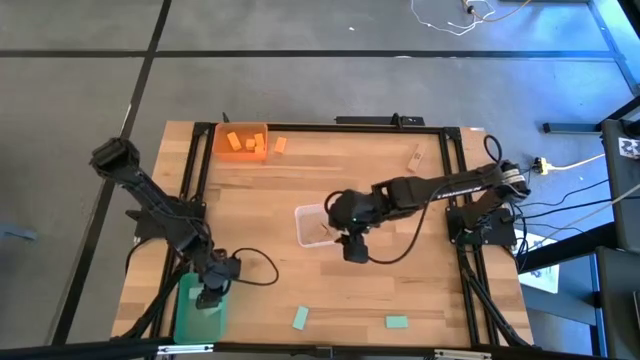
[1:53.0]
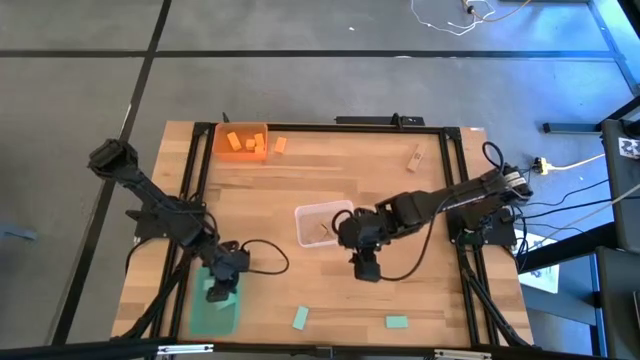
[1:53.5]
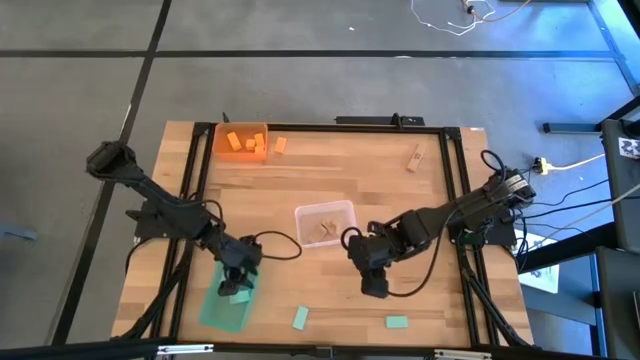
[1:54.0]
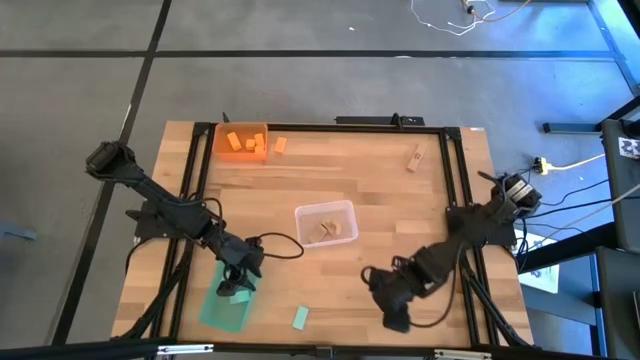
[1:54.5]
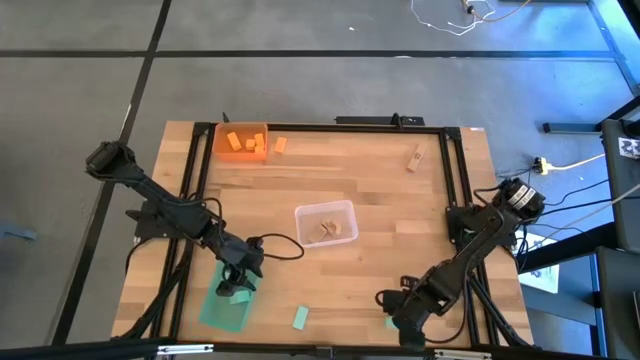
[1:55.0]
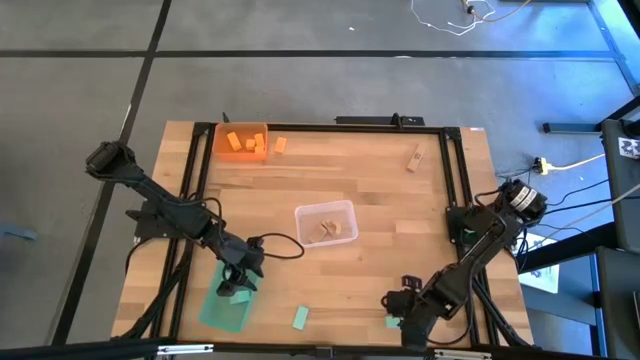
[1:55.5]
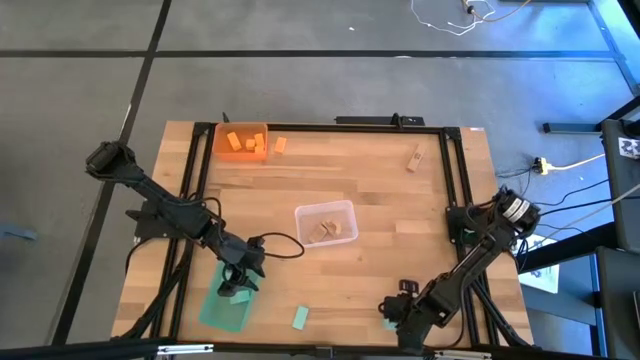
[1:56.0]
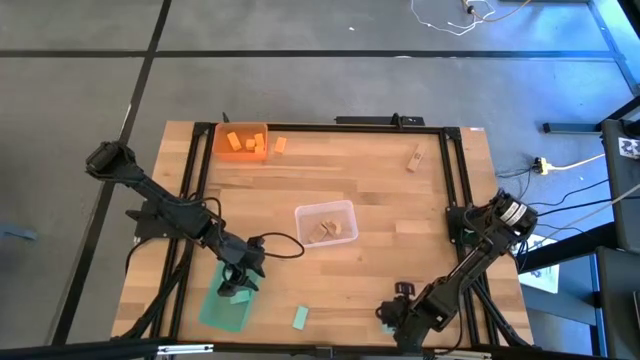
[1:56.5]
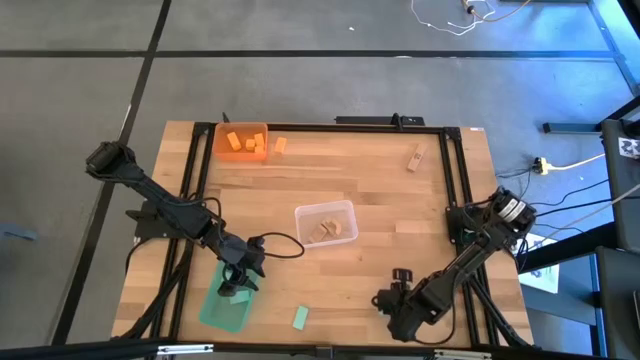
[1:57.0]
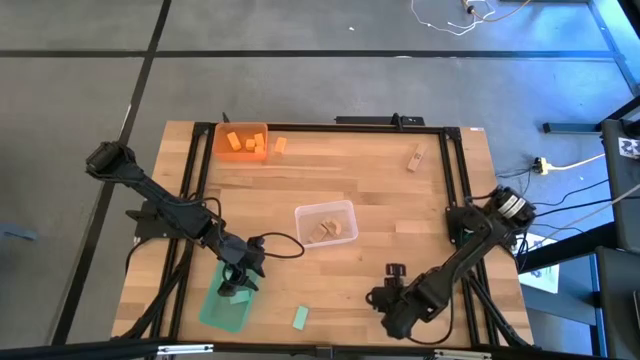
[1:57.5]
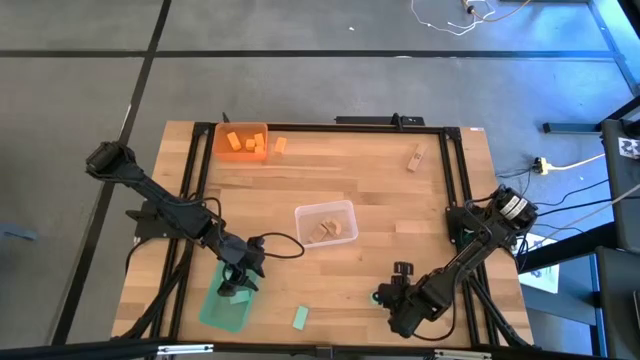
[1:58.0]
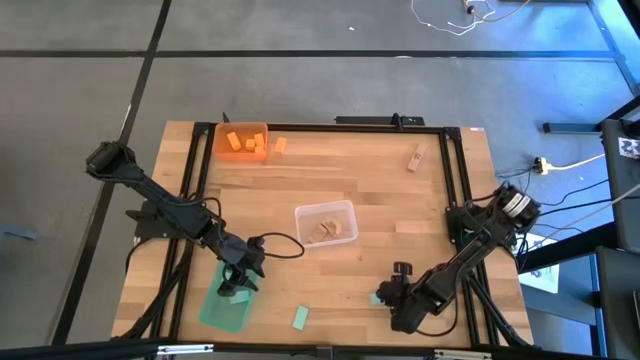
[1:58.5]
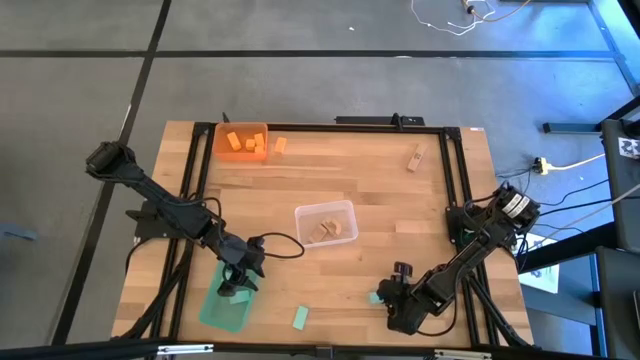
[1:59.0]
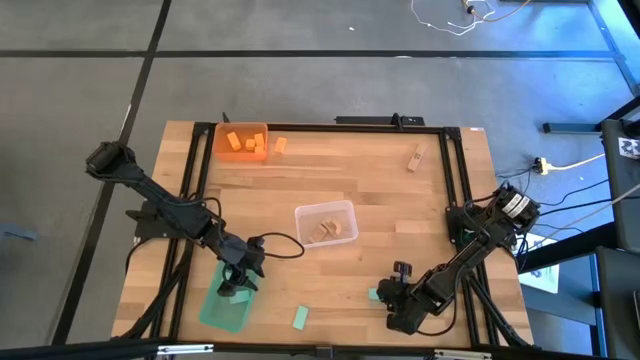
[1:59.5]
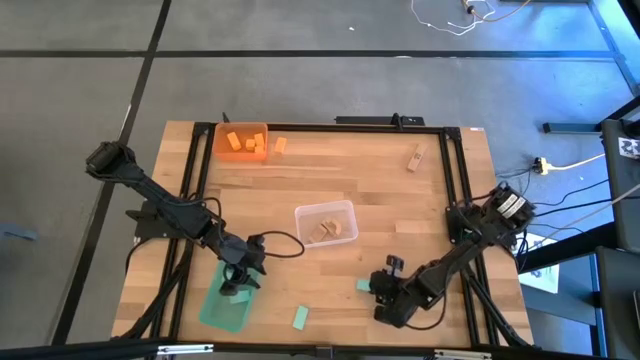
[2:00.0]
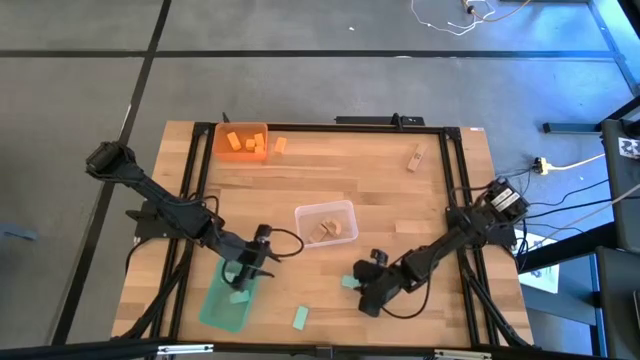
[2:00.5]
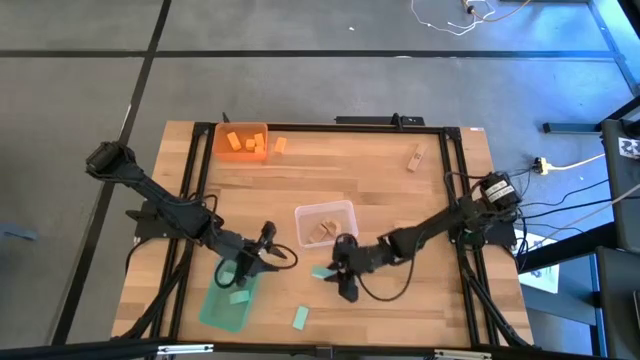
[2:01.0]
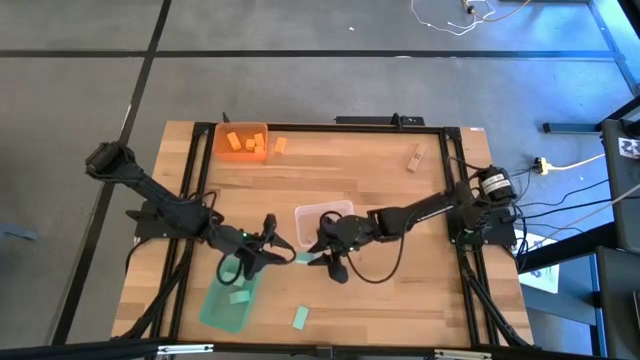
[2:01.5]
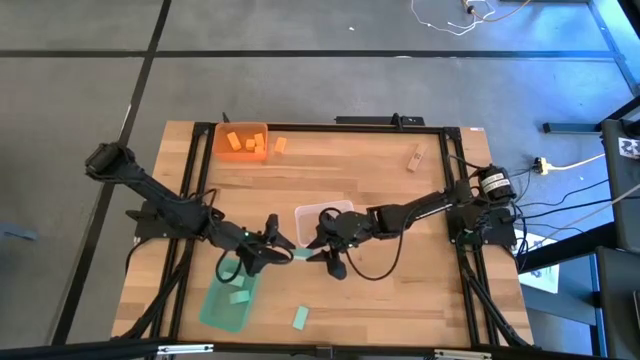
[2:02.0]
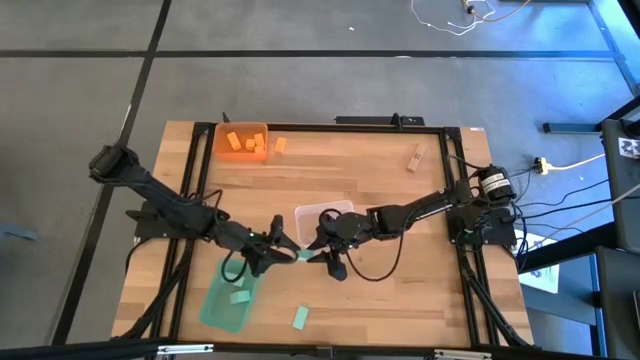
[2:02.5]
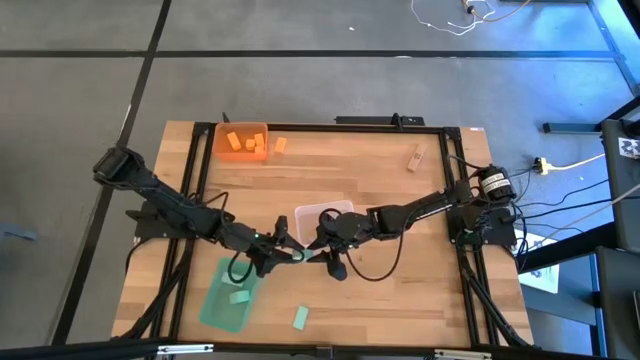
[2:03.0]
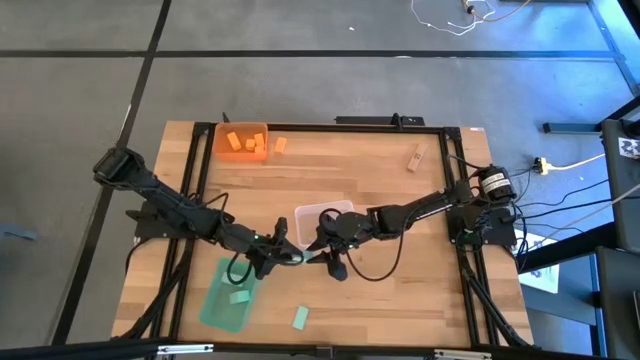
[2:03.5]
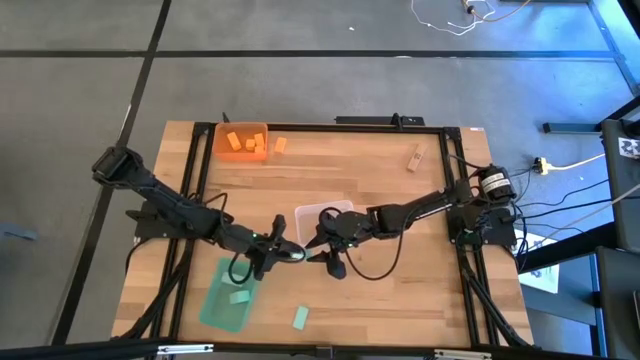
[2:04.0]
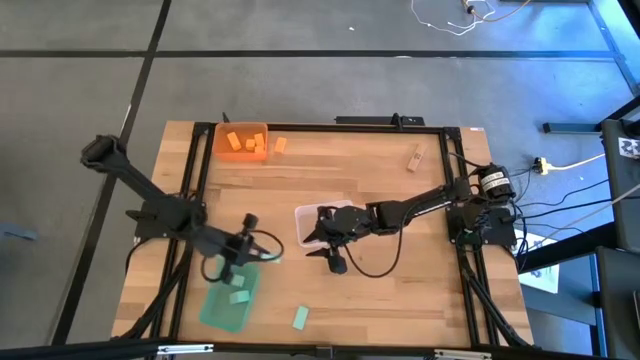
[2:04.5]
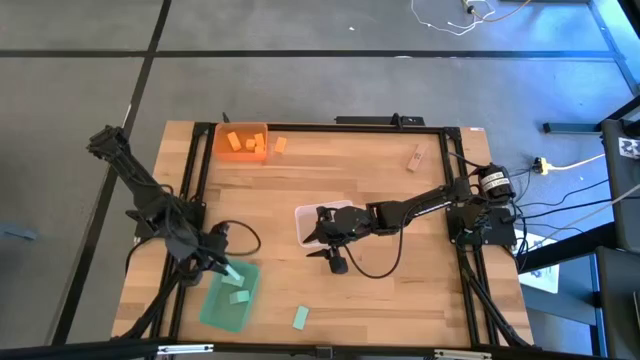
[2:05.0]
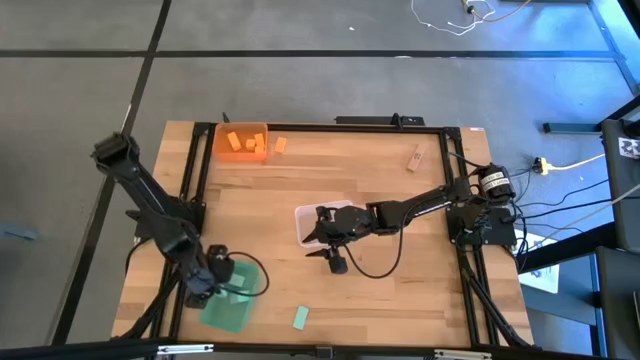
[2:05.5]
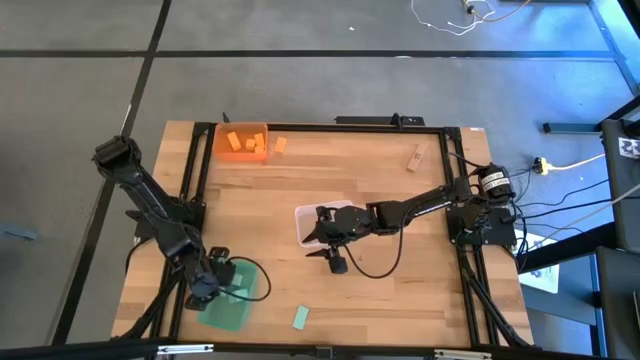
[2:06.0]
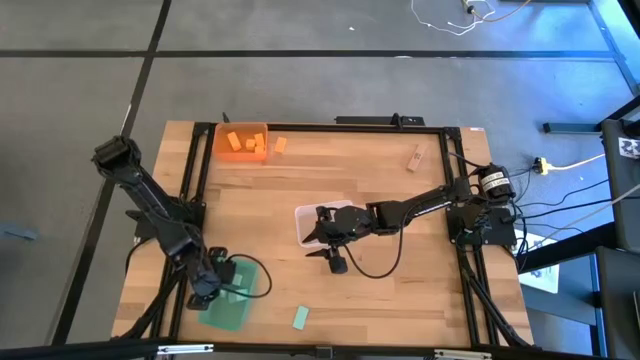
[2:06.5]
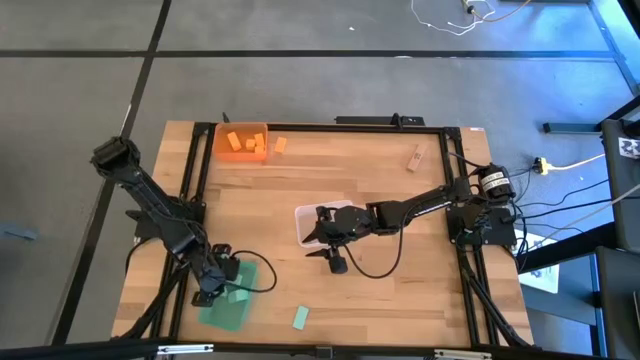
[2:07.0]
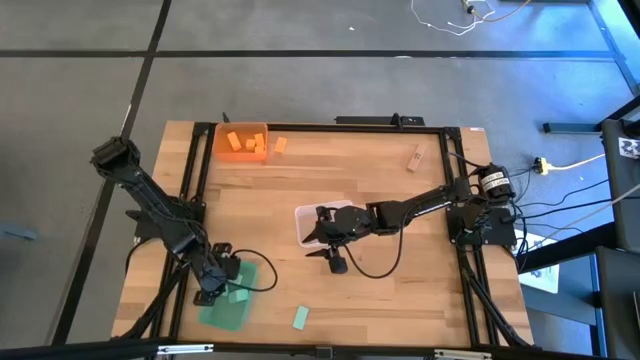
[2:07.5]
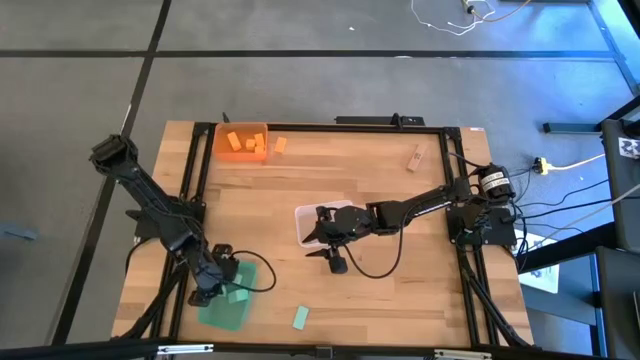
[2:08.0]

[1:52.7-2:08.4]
Task: Sort & place blocks by color
Put the blue block into the green bin

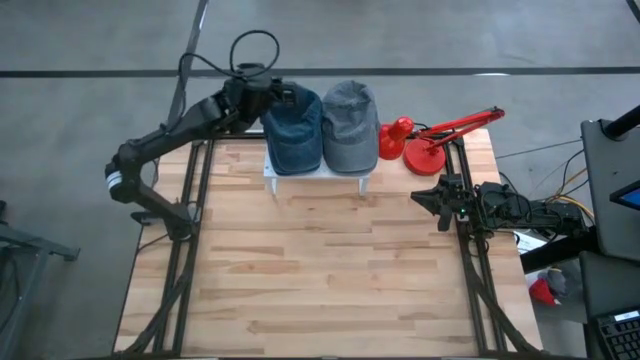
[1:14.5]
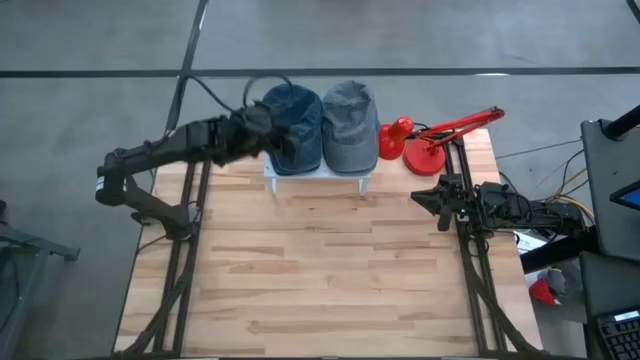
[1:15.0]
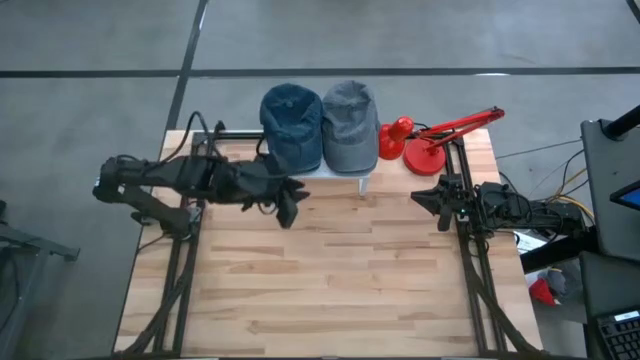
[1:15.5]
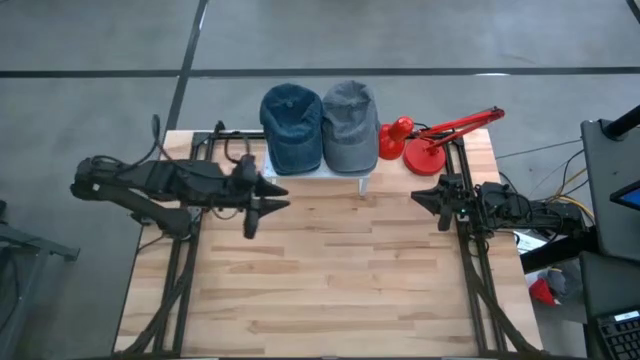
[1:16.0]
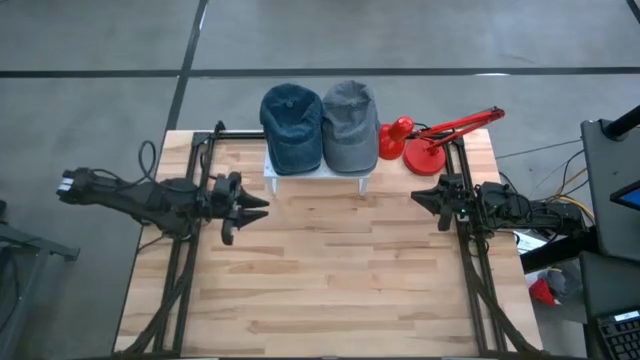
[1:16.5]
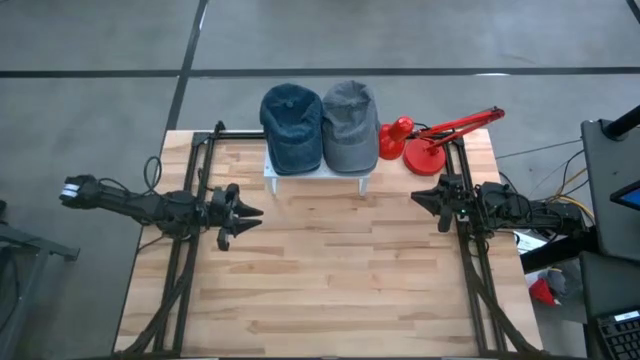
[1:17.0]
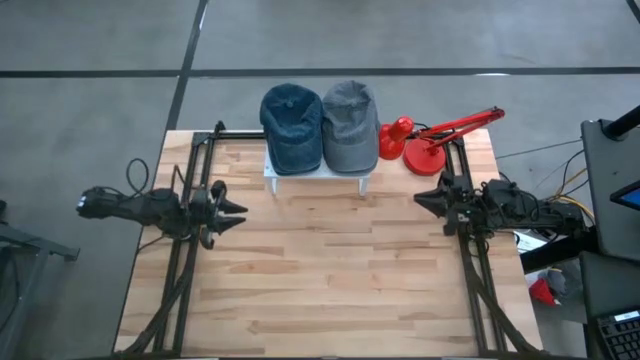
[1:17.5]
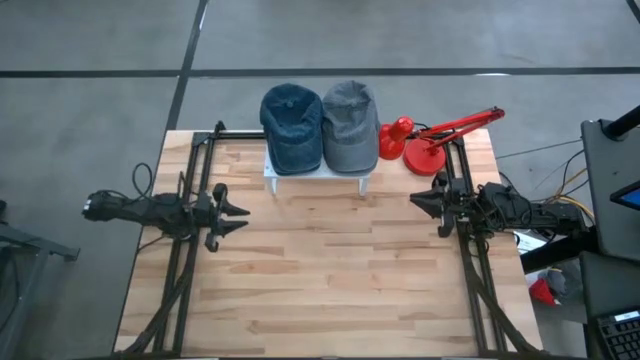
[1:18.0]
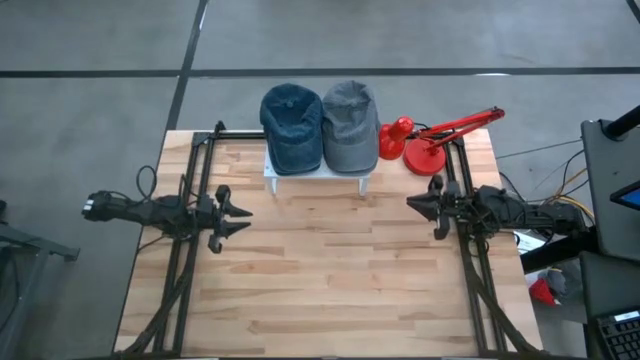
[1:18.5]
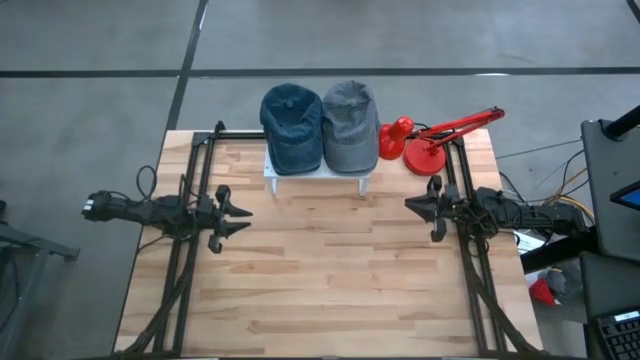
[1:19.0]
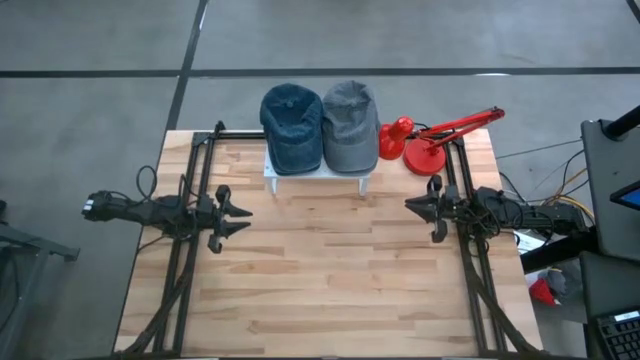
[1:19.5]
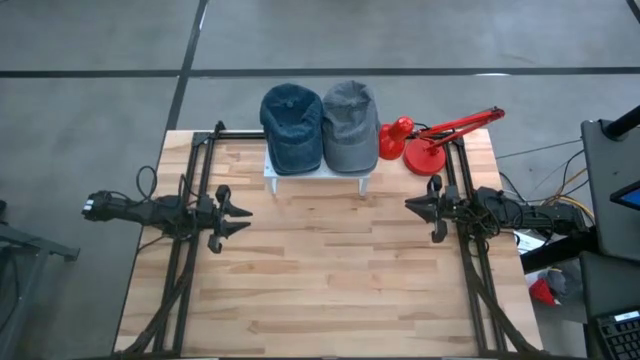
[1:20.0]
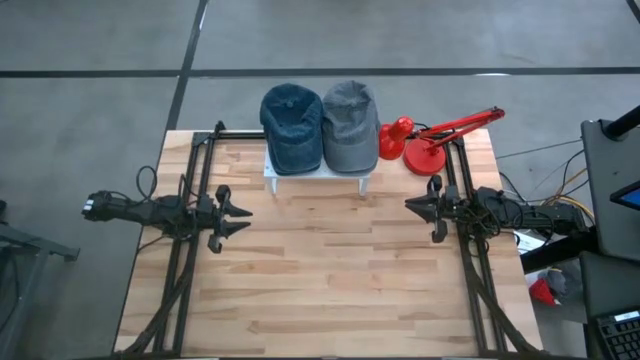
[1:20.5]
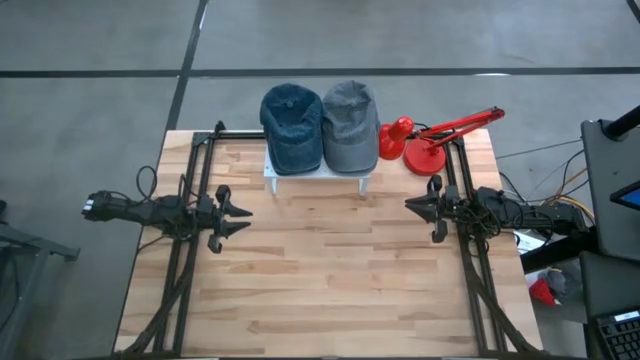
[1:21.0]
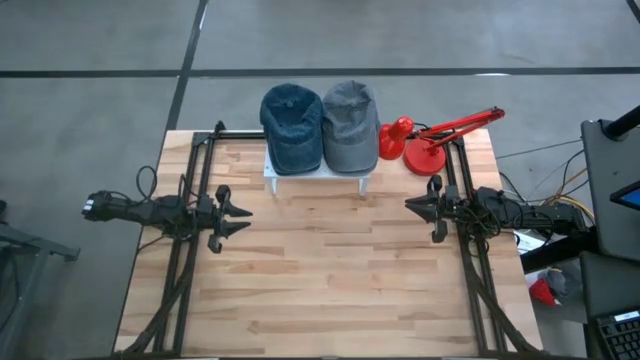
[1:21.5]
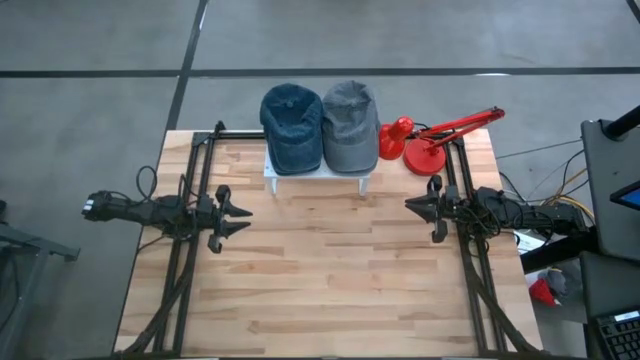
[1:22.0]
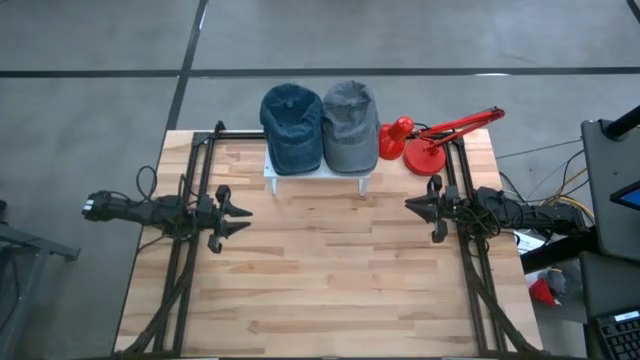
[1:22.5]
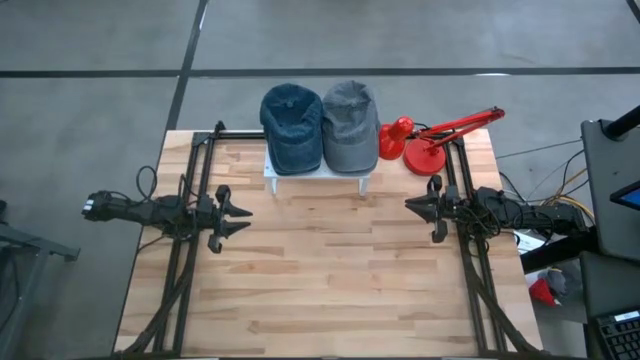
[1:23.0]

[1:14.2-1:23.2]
Task: Pick & Place hat
Return To Home Position
